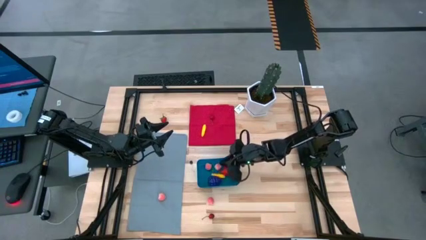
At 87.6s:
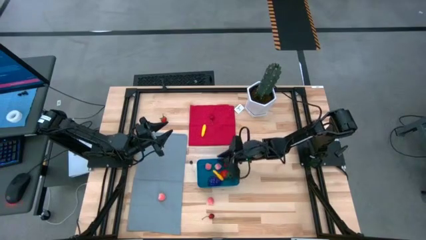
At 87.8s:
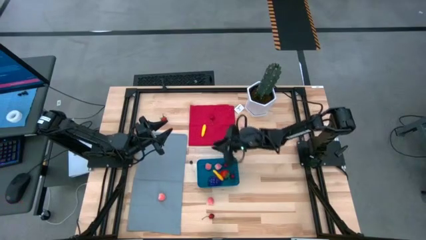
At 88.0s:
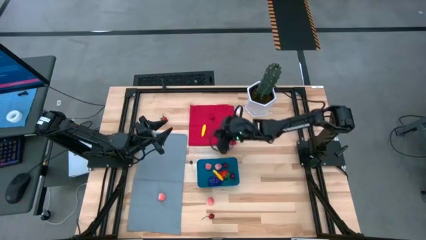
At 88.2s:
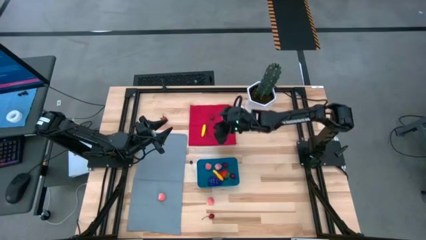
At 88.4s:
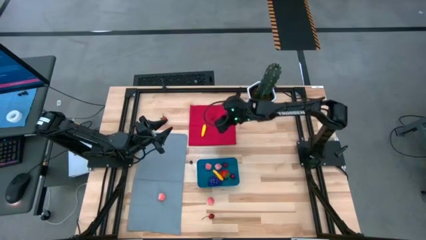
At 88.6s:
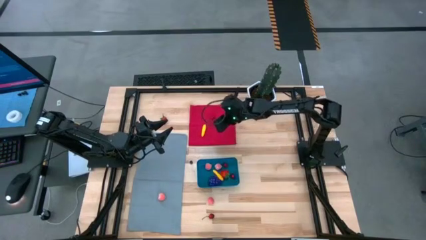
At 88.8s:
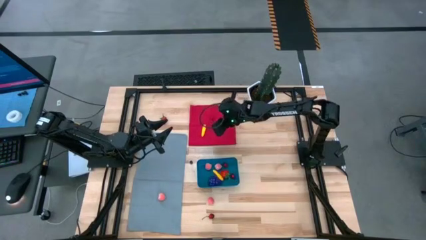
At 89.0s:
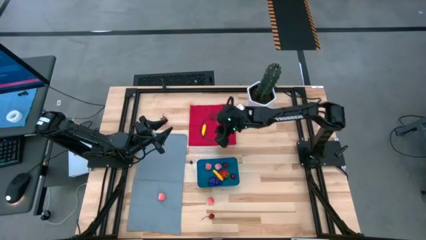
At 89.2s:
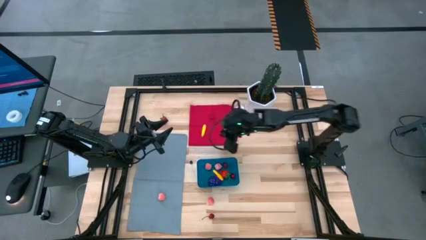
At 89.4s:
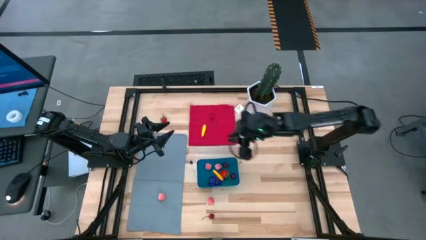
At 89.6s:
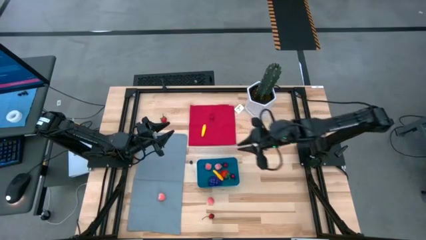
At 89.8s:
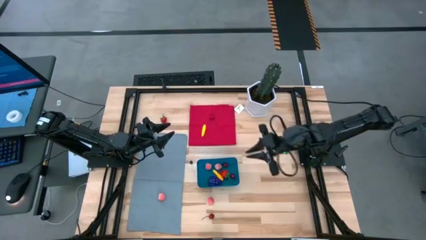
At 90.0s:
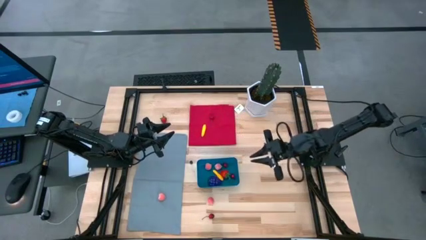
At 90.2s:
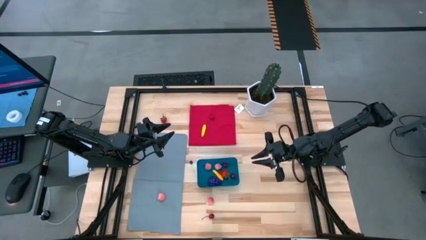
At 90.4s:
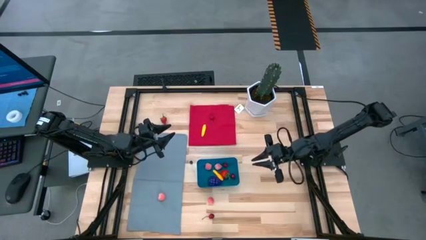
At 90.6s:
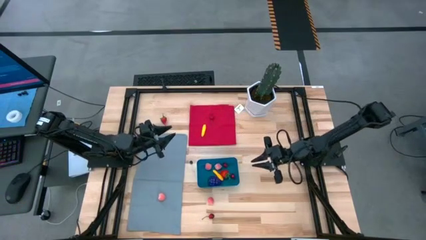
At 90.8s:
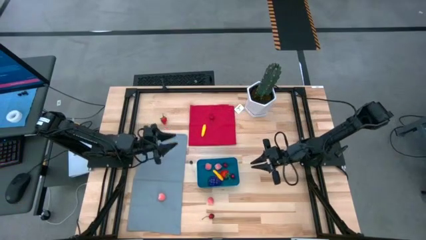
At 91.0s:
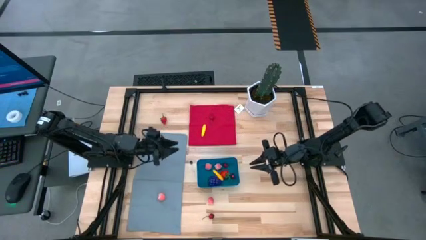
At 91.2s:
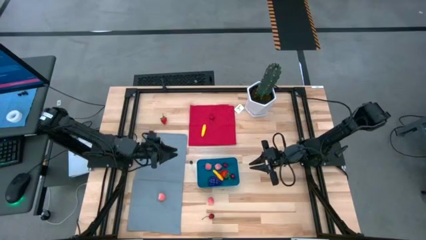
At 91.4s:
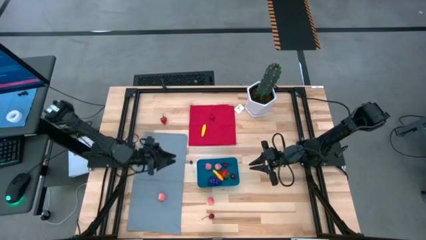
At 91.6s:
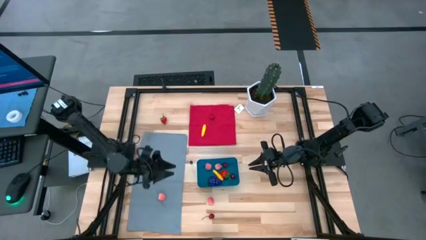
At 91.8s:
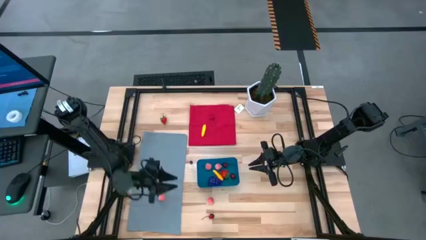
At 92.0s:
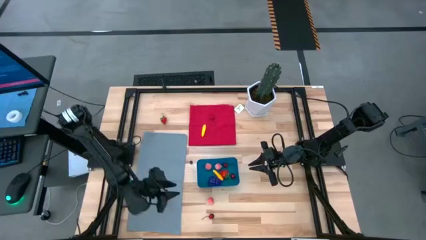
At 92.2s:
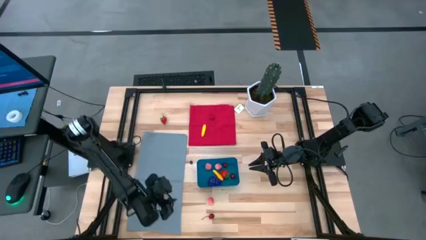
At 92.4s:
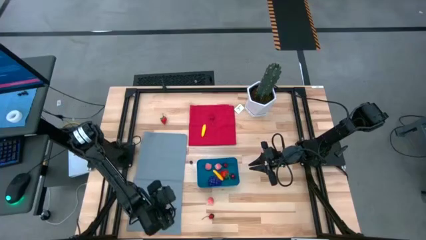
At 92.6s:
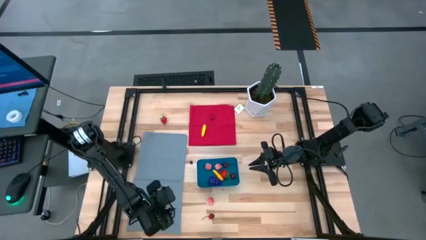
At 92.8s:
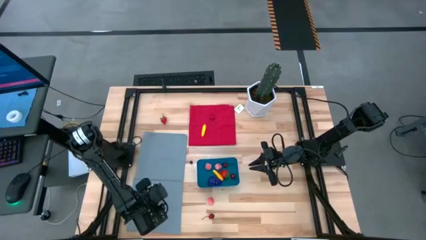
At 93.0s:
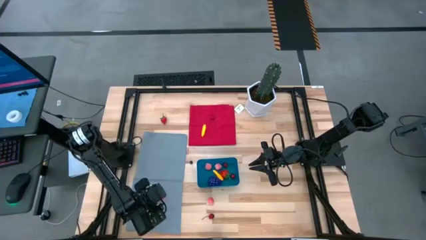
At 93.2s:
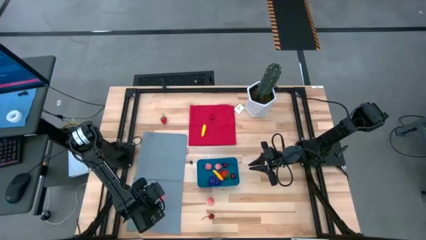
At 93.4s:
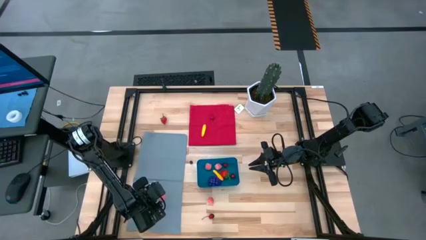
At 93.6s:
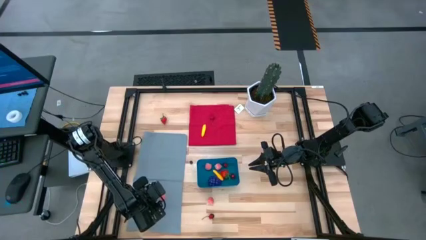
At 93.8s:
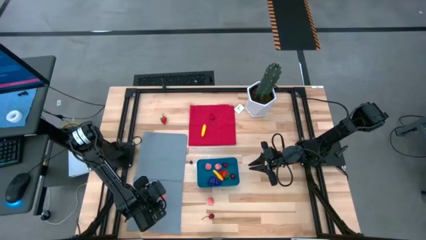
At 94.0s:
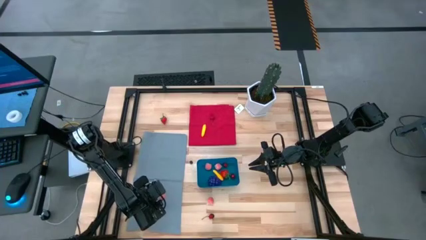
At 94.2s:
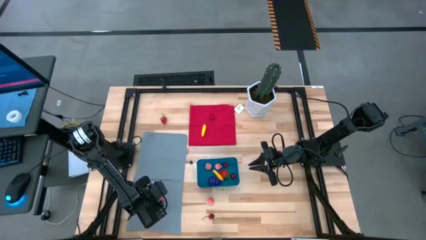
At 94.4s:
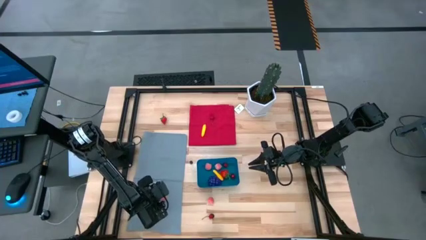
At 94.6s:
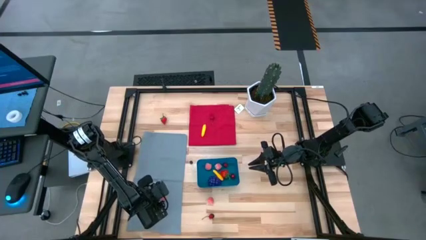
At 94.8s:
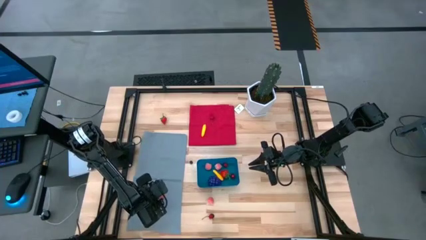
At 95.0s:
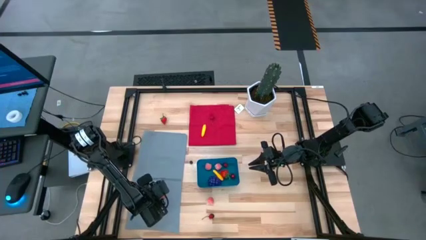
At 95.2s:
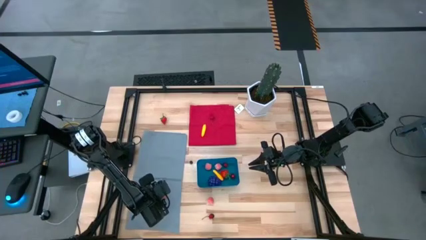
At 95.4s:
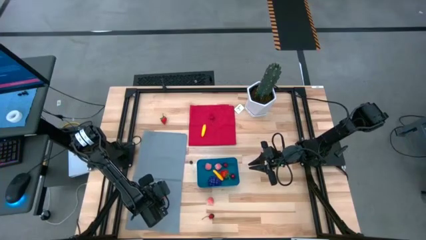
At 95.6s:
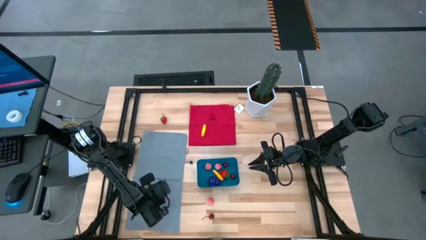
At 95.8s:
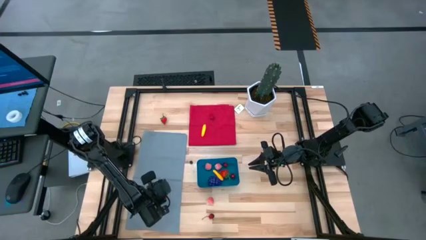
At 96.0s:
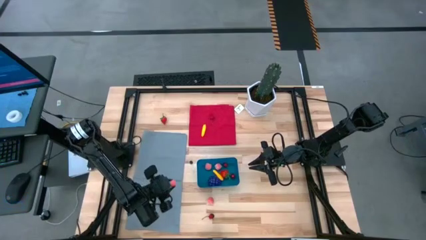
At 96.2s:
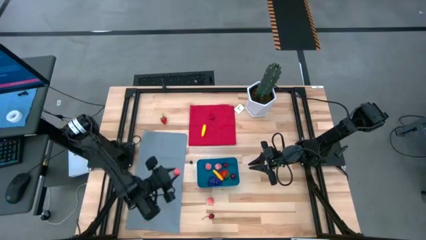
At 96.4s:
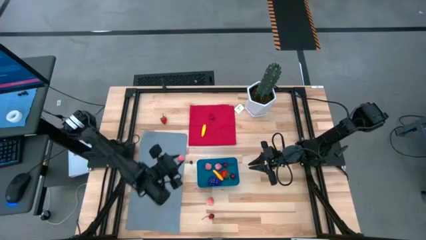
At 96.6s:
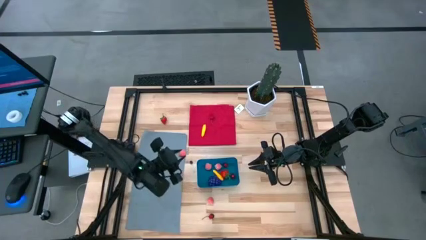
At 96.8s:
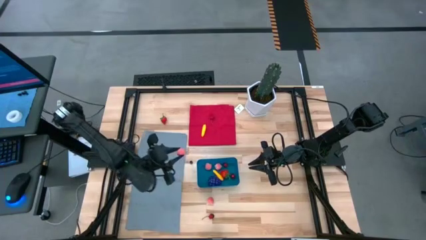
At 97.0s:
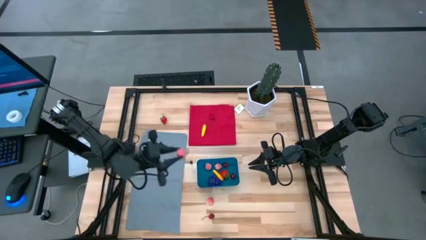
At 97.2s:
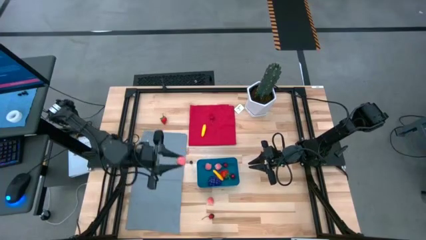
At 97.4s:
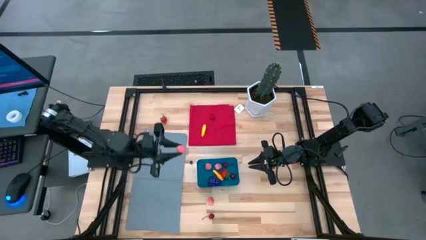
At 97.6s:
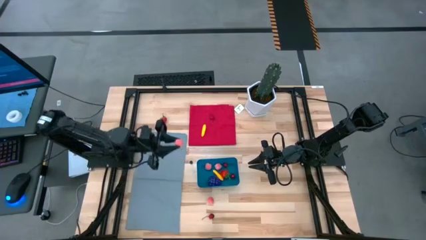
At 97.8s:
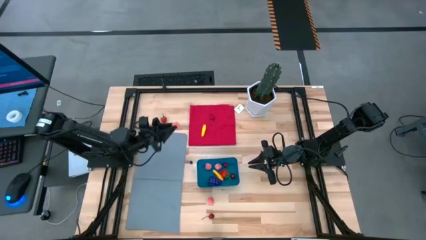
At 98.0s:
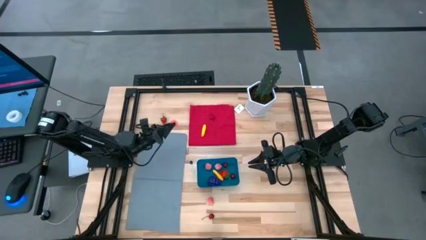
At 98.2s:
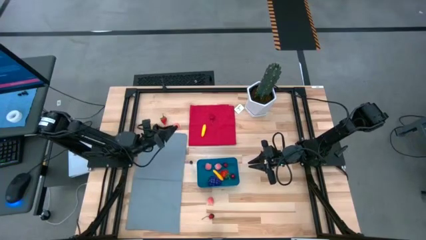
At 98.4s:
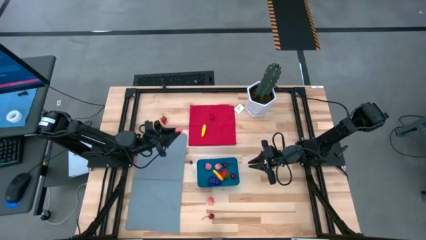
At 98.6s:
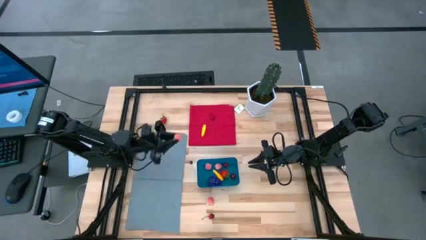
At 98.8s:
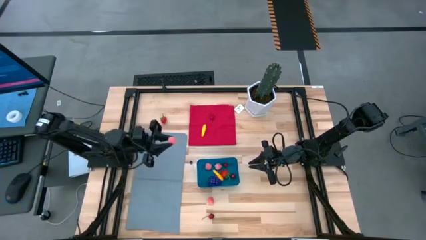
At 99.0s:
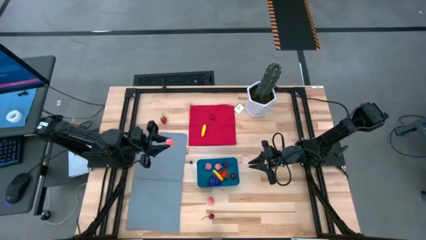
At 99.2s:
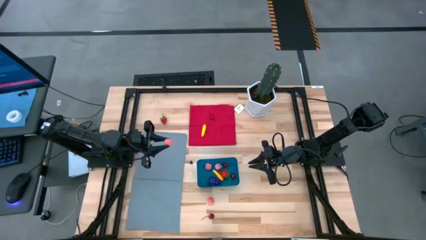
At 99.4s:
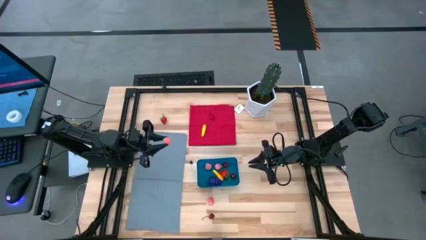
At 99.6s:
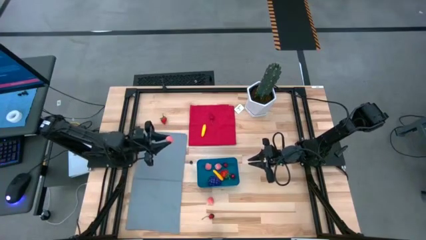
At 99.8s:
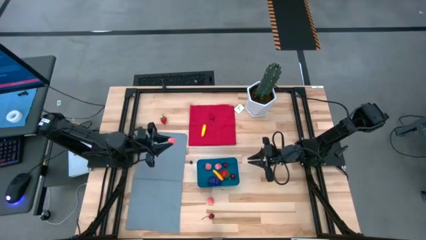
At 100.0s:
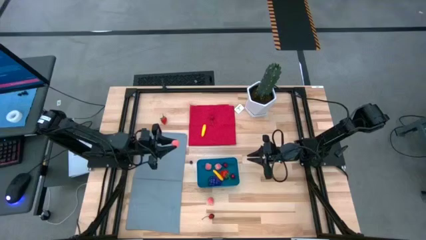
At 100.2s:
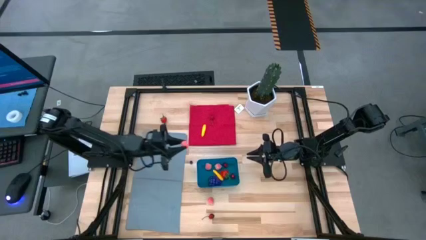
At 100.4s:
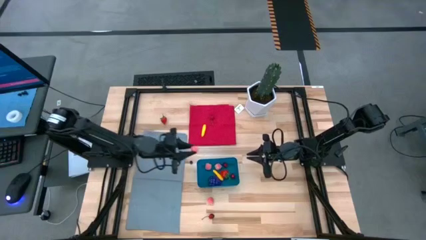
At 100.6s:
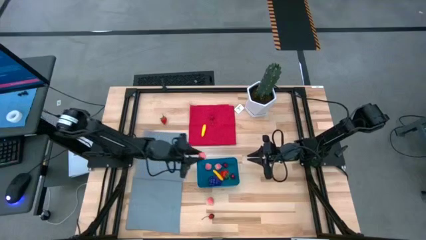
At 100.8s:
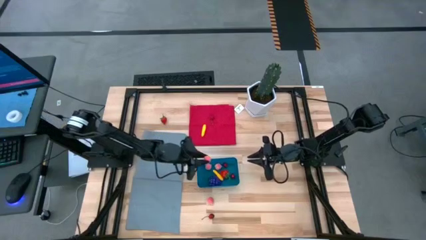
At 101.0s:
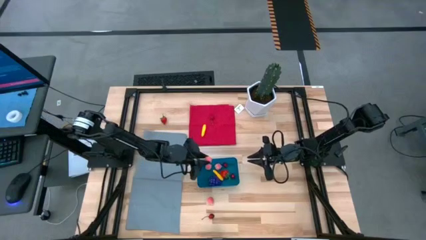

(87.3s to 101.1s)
Task: Pick and placing Produce into tupperware
Put the peach into the blue bin
